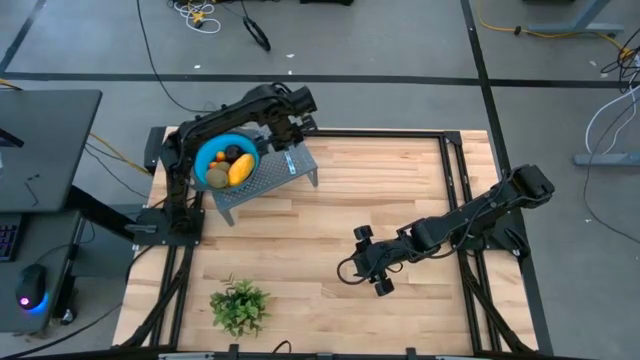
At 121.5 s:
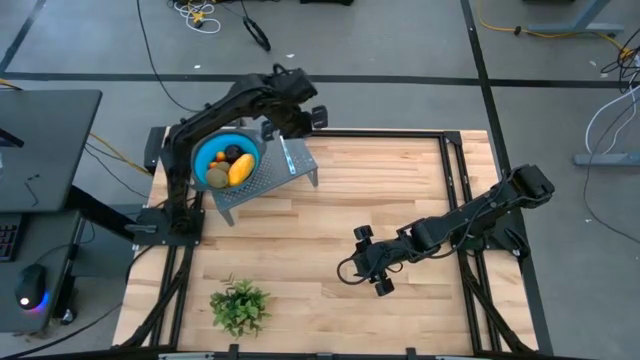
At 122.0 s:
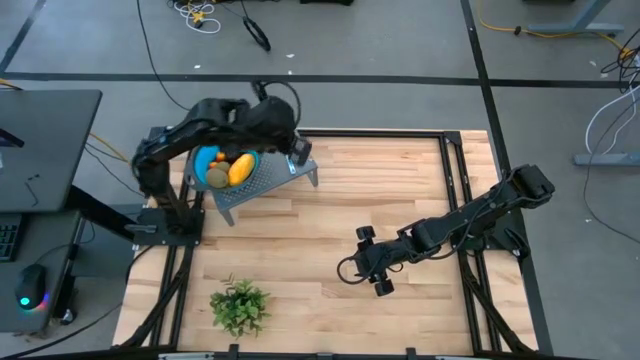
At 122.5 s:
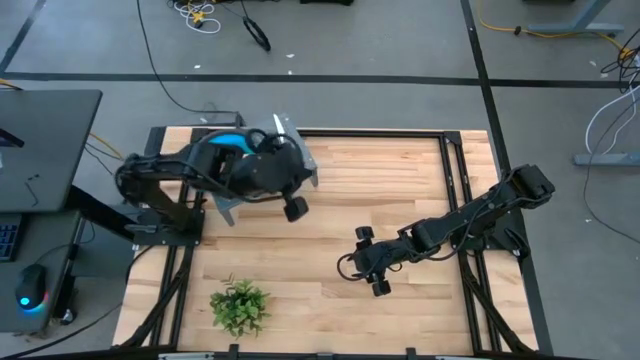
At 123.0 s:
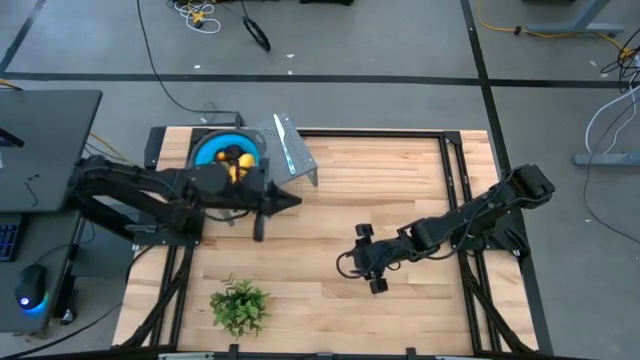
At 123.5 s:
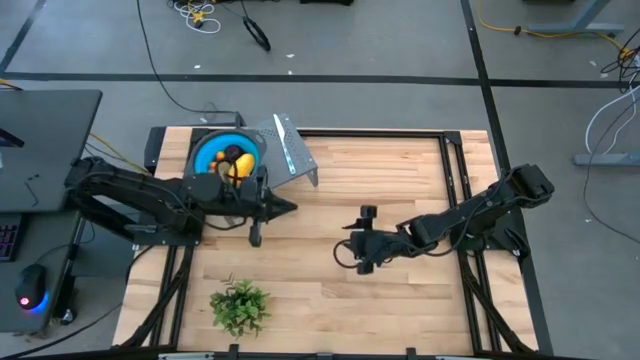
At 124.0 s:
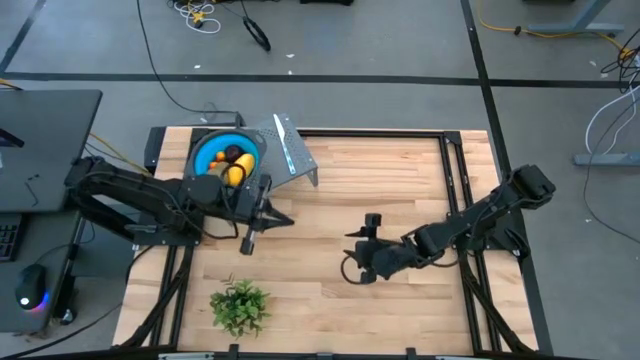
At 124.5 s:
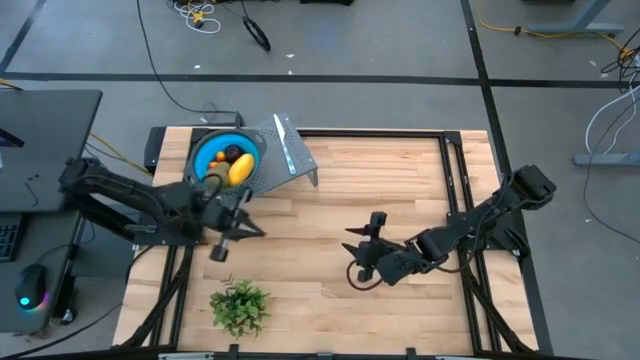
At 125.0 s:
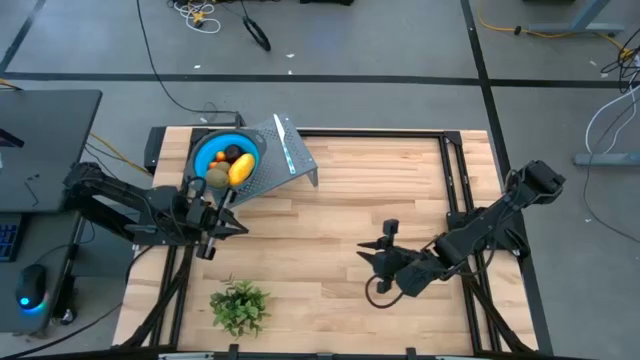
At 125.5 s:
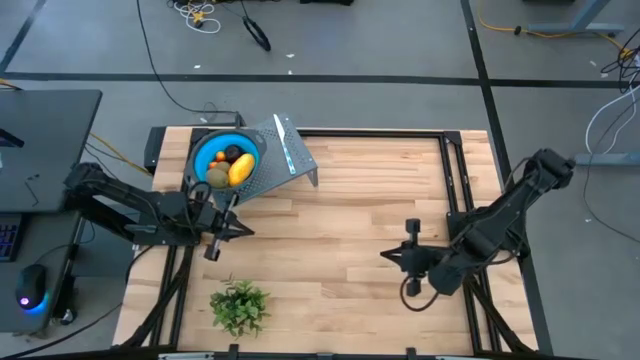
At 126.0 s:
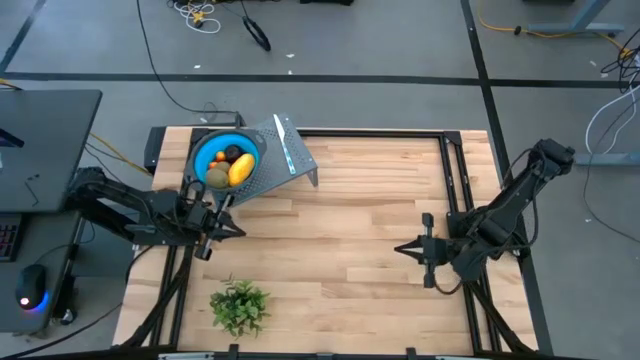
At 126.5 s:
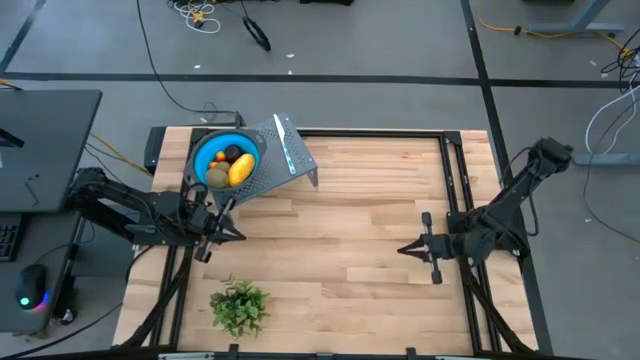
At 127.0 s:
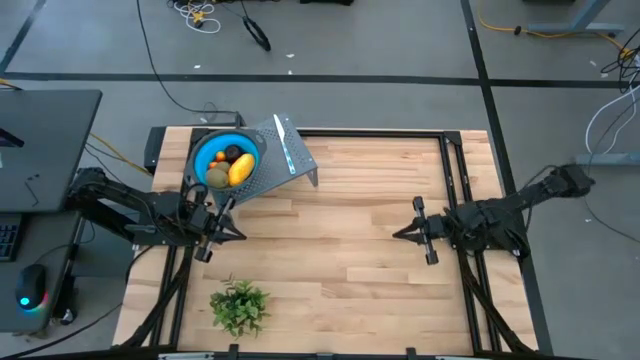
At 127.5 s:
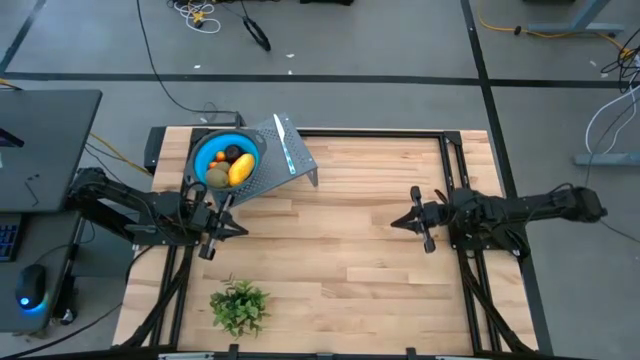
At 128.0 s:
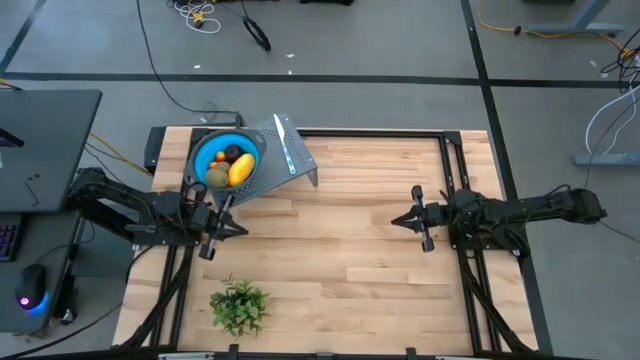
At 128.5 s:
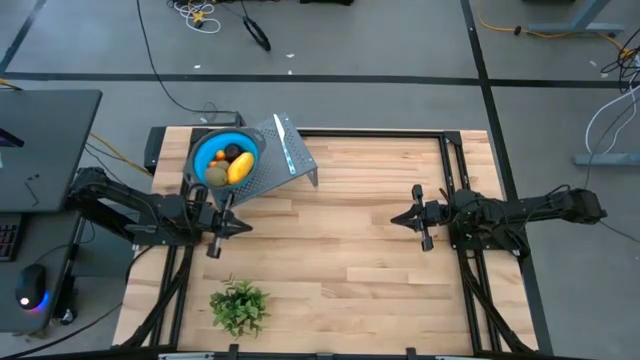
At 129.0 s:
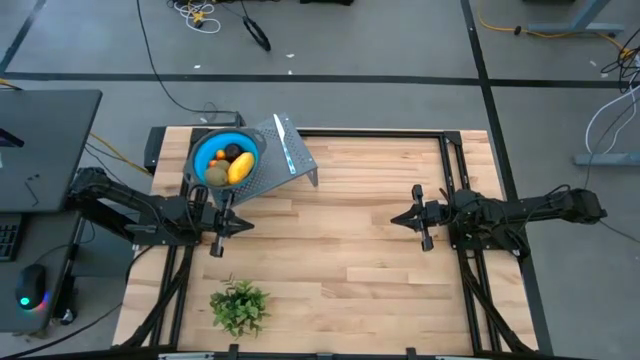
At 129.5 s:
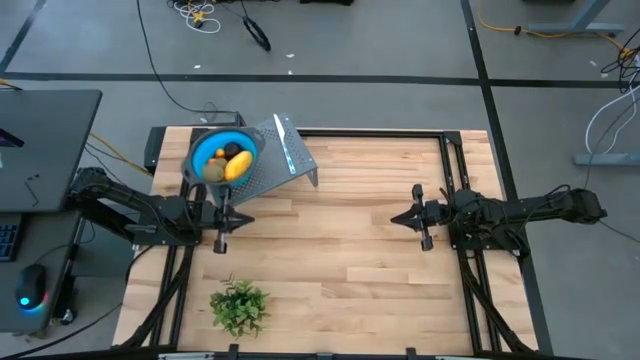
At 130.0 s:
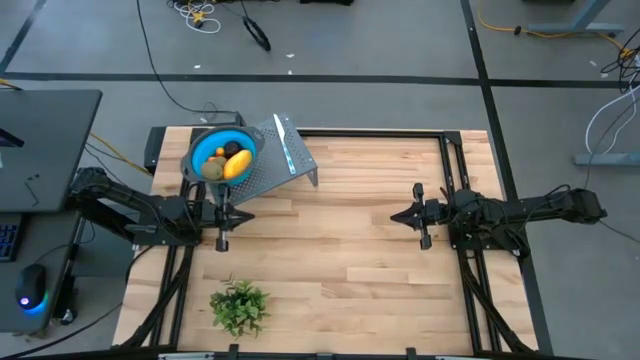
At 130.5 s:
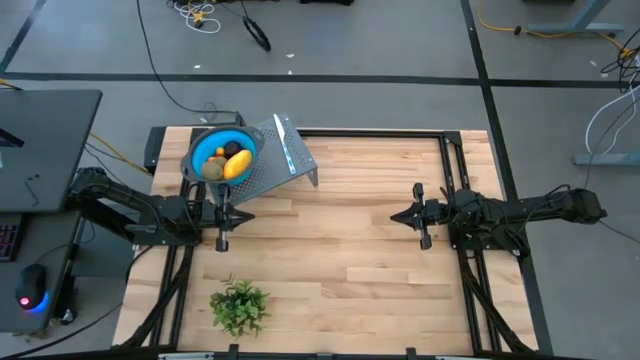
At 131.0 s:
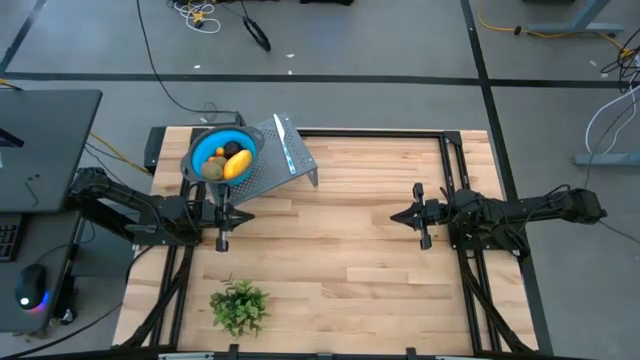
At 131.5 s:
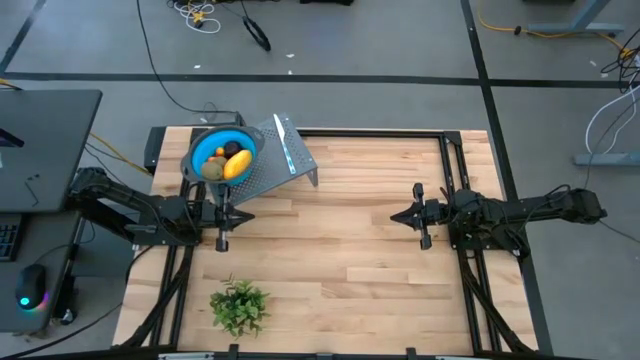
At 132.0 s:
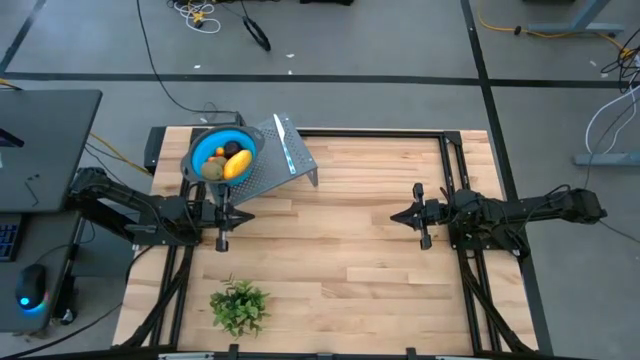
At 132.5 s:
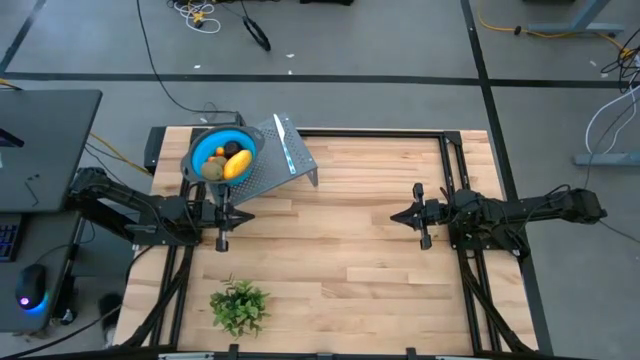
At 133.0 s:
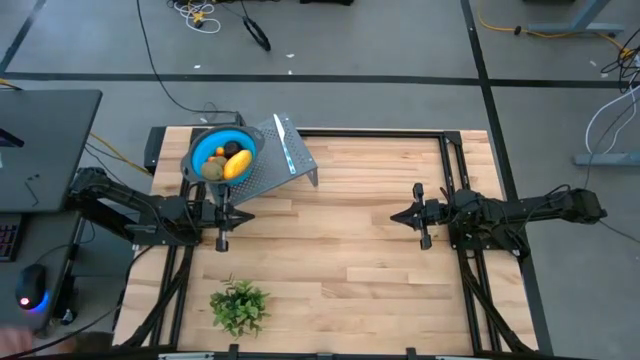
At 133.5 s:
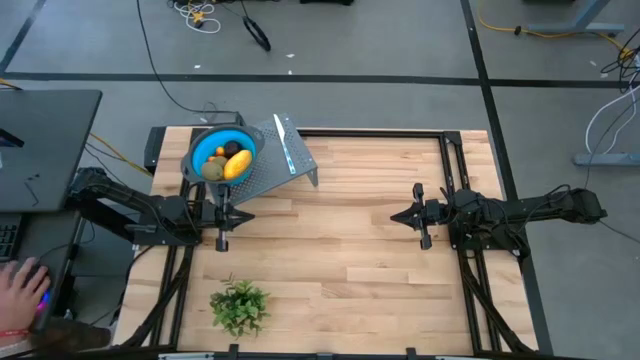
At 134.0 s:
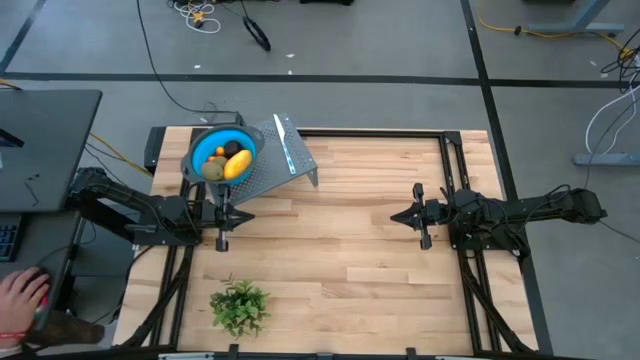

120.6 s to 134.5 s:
Task: Pick & Place Fruit
Return to Home Position

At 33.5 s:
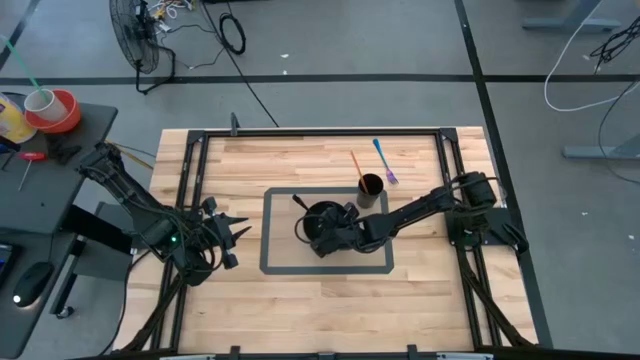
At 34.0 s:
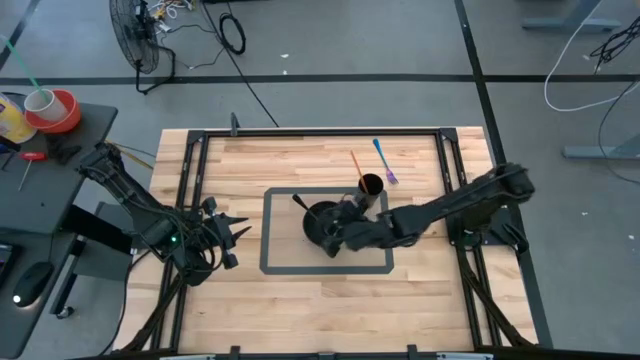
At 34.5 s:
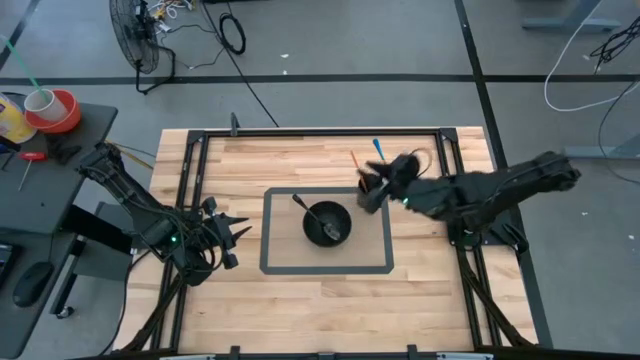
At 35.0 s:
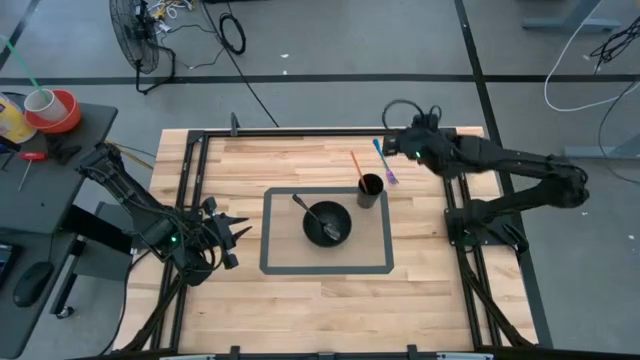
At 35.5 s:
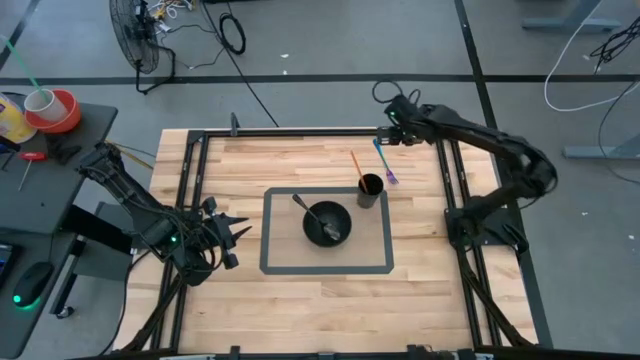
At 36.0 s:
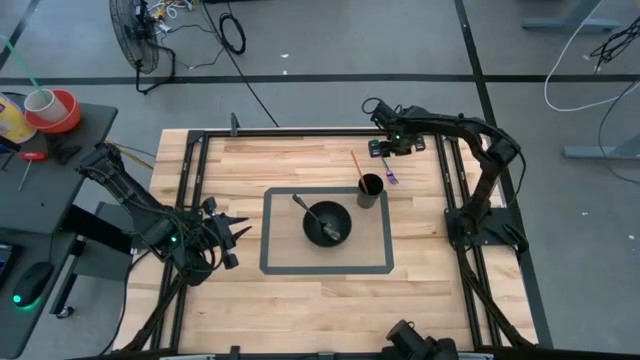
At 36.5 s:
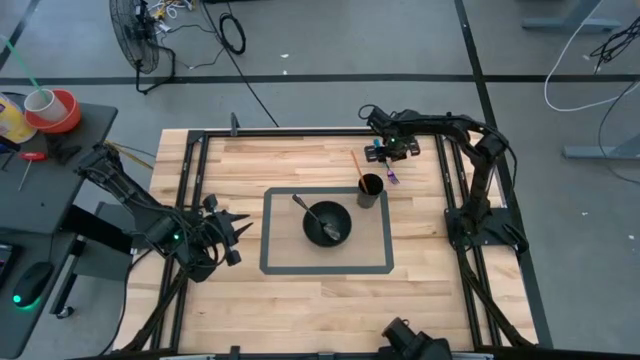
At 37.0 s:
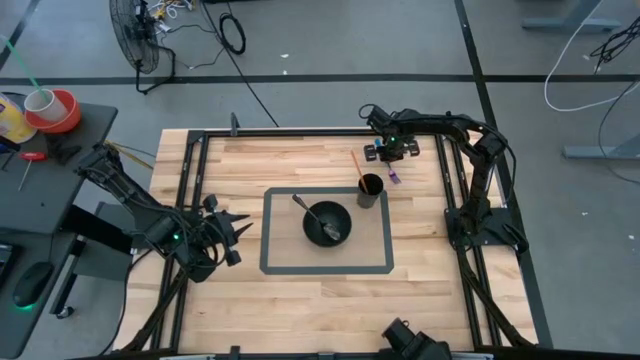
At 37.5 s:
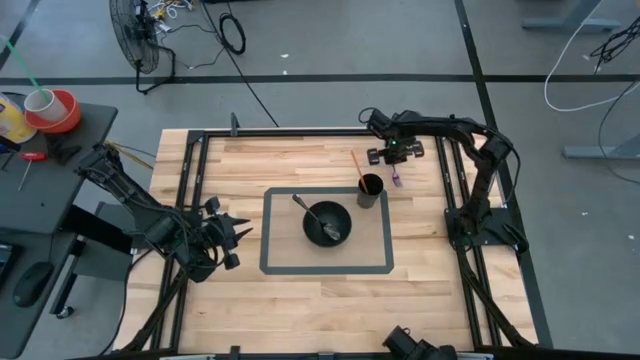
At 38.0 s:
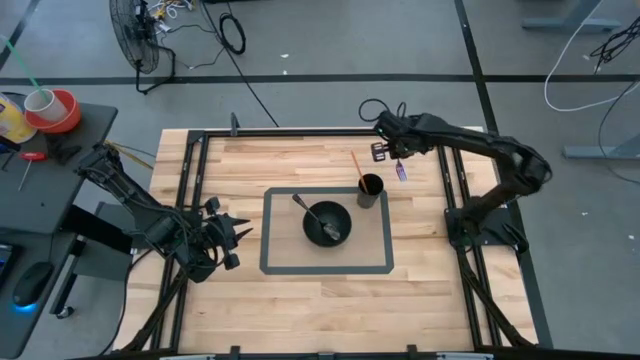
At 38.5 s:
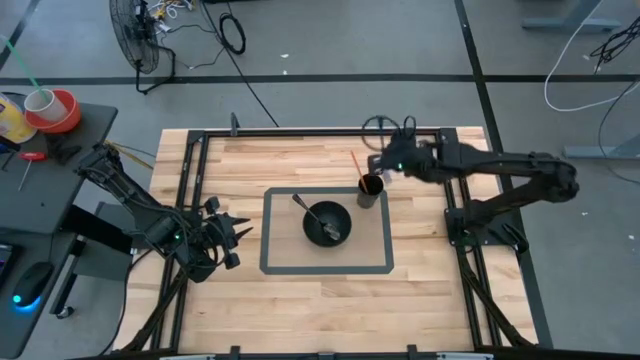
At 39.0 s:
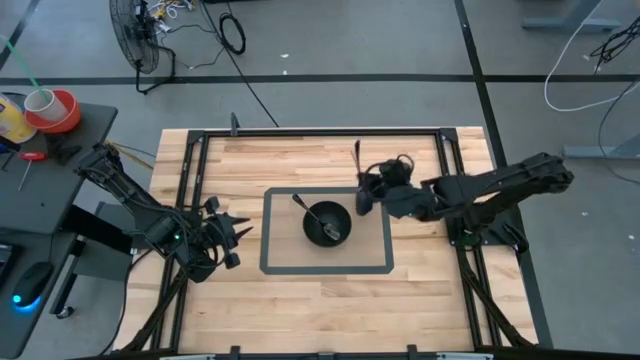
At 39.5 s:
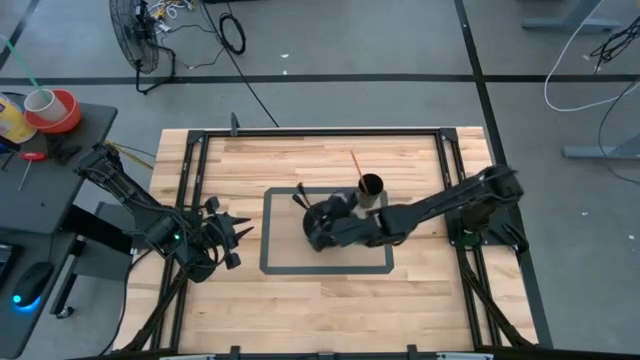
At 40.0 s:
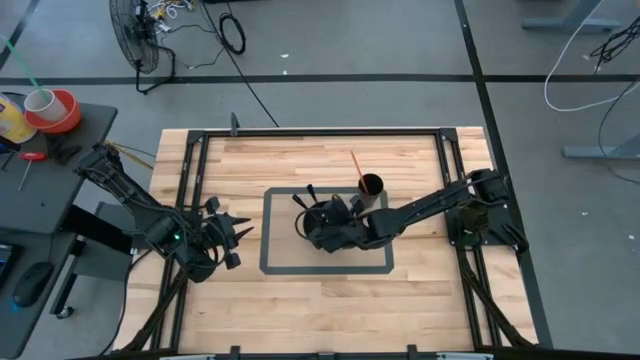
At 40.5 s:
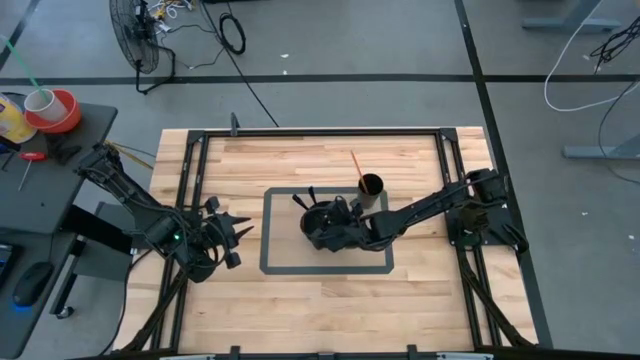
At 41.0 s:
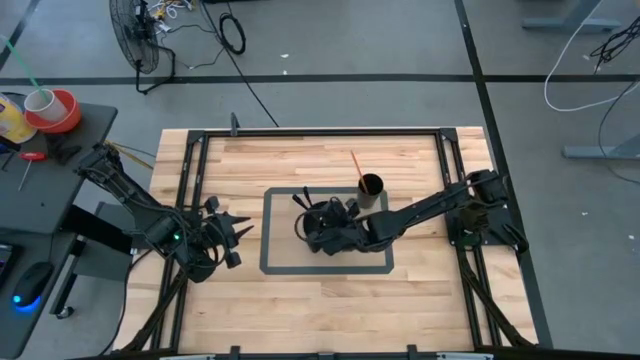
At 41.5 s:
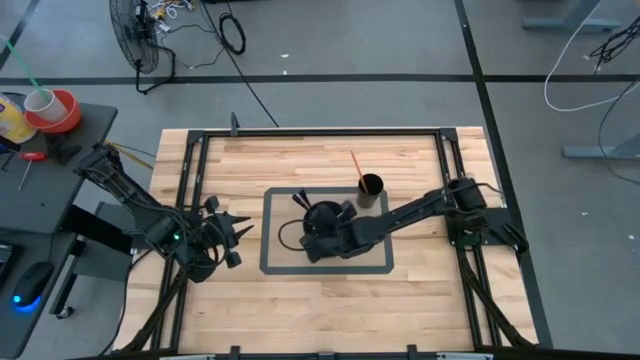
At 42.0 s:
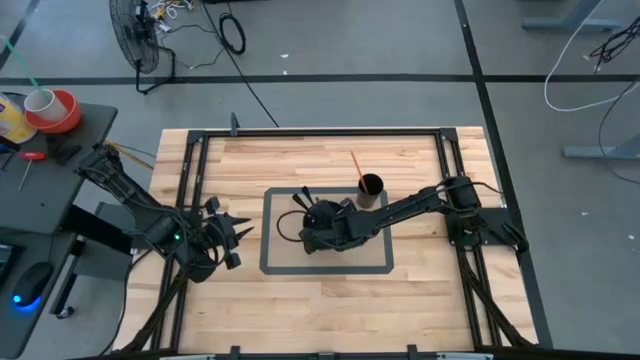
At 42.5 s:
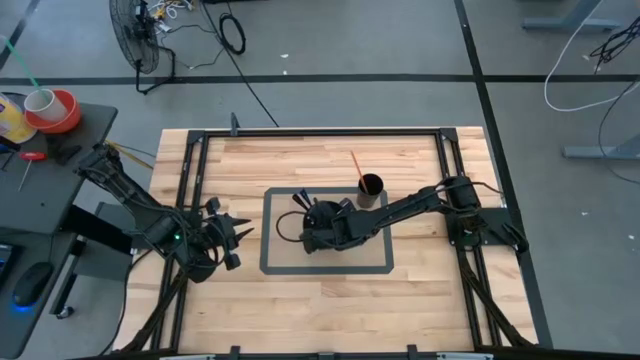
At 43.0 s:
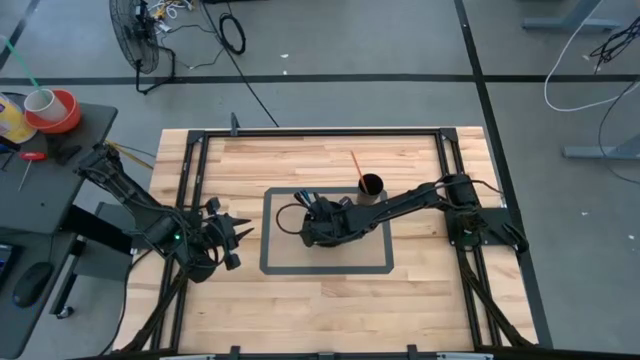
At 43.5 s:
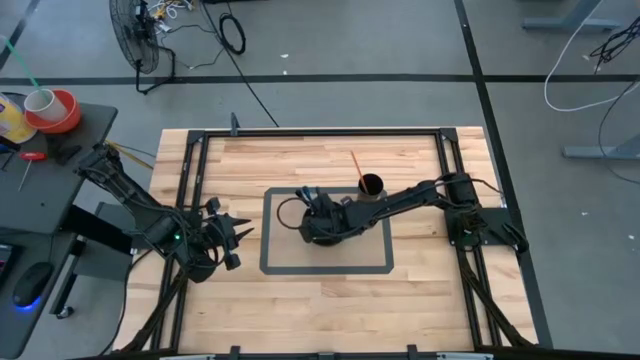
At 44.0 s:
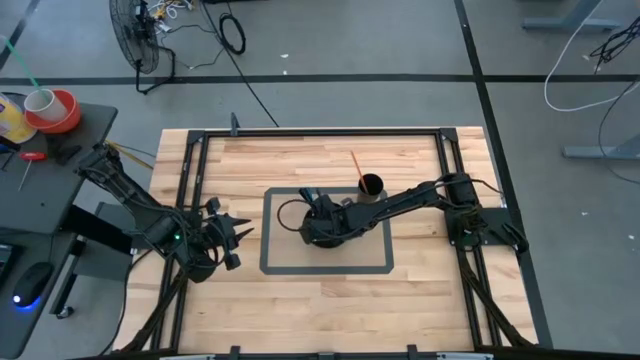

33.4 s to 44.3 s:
Task: Pick & Place Utensil
Put the blue fork into the black bowl on the transparent mat
